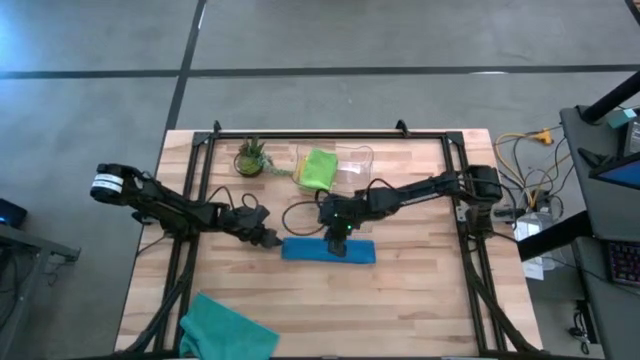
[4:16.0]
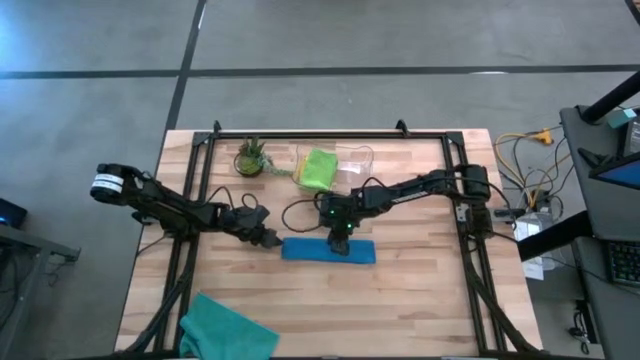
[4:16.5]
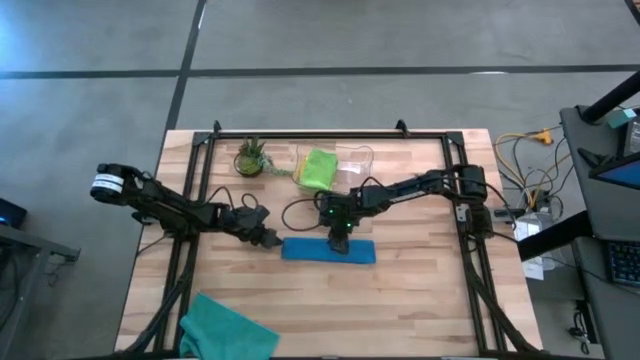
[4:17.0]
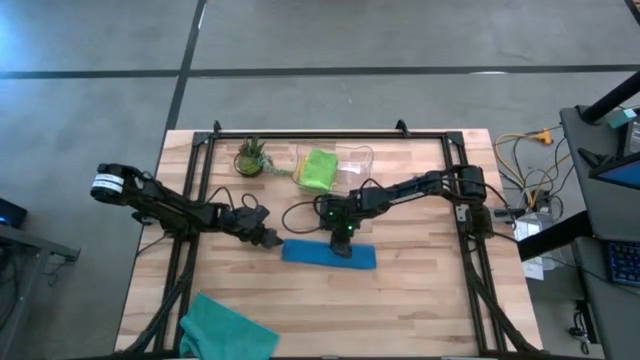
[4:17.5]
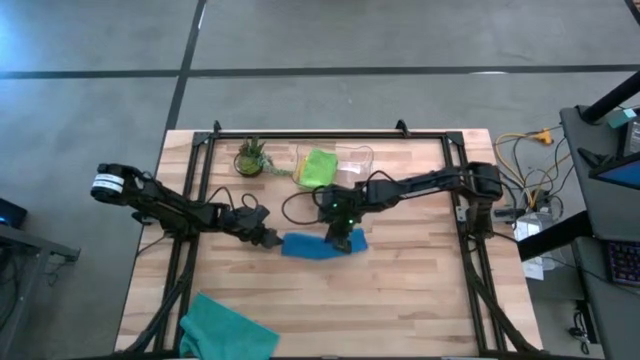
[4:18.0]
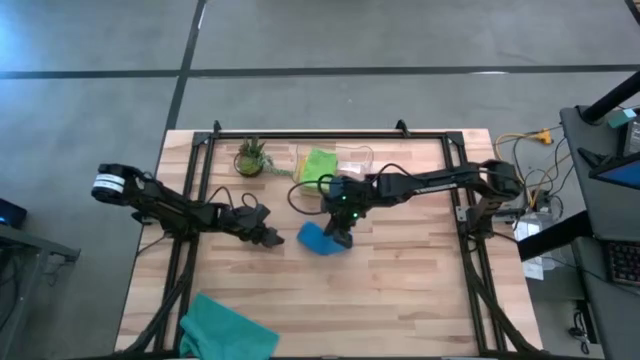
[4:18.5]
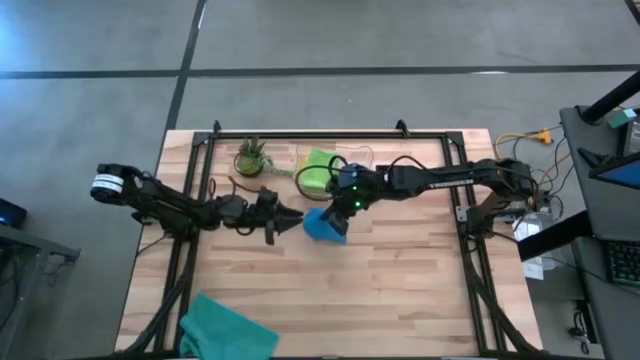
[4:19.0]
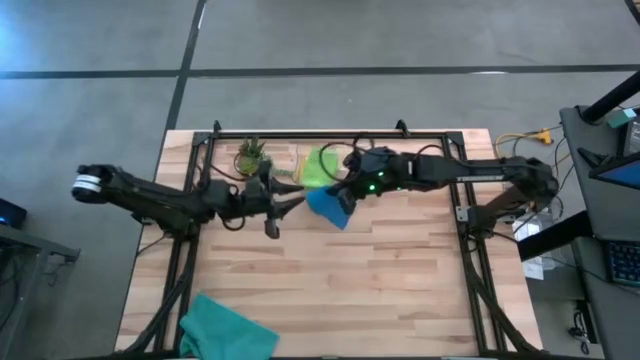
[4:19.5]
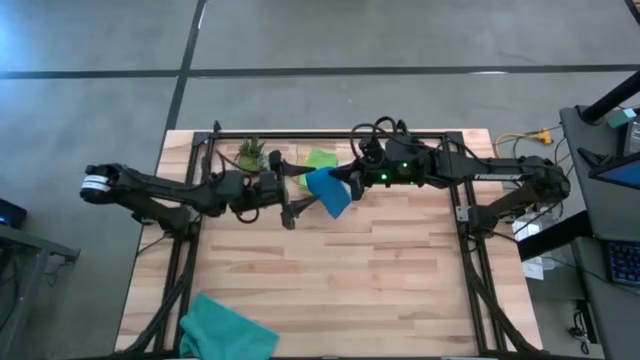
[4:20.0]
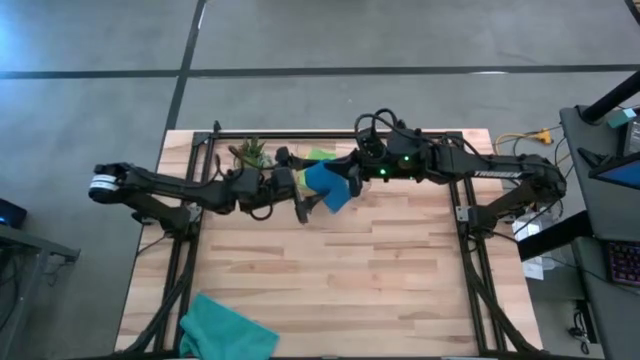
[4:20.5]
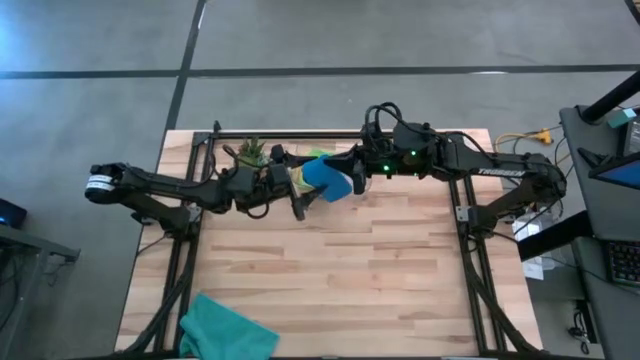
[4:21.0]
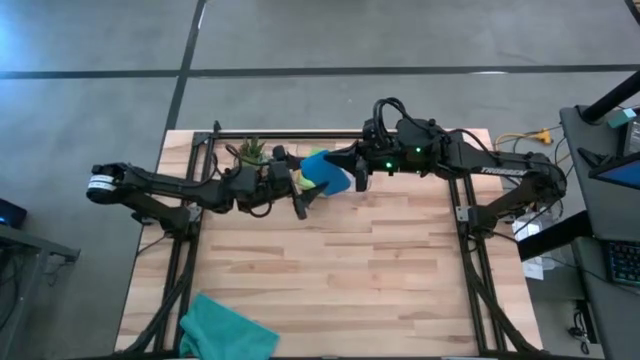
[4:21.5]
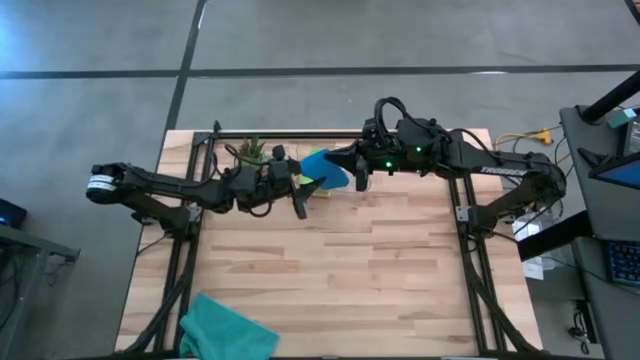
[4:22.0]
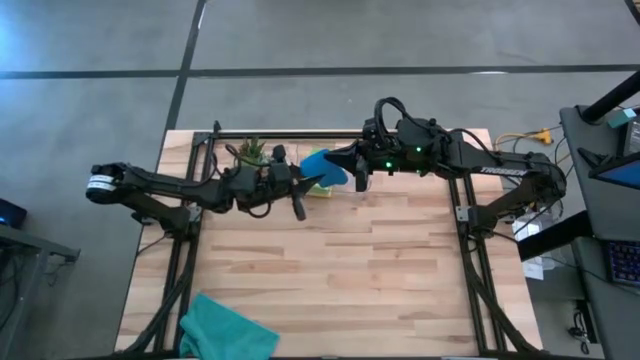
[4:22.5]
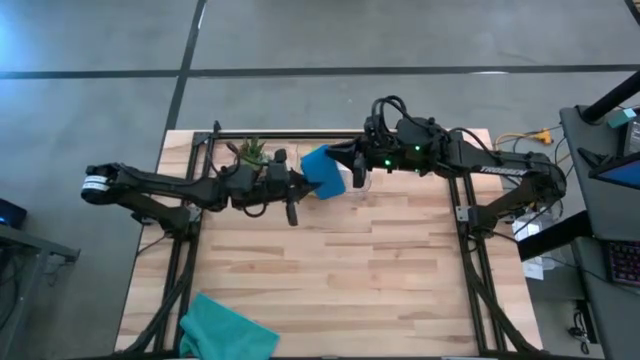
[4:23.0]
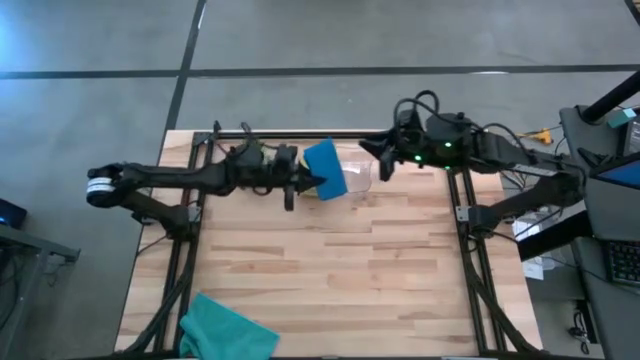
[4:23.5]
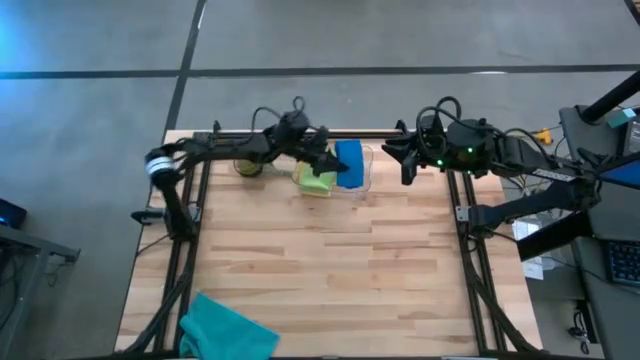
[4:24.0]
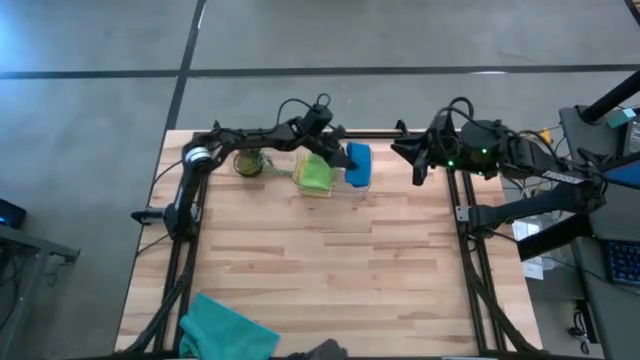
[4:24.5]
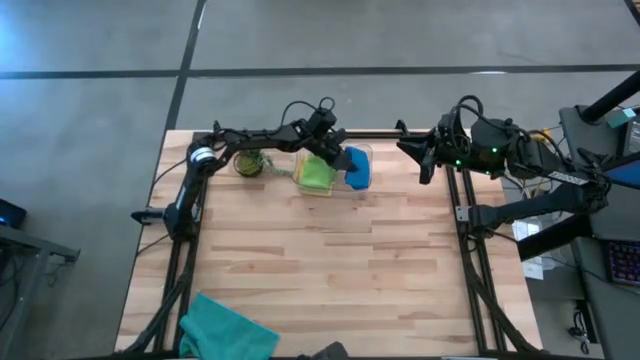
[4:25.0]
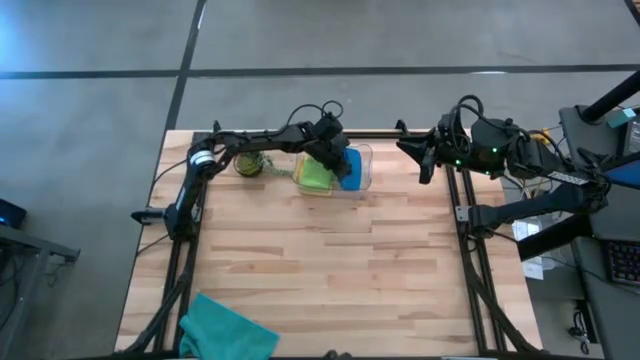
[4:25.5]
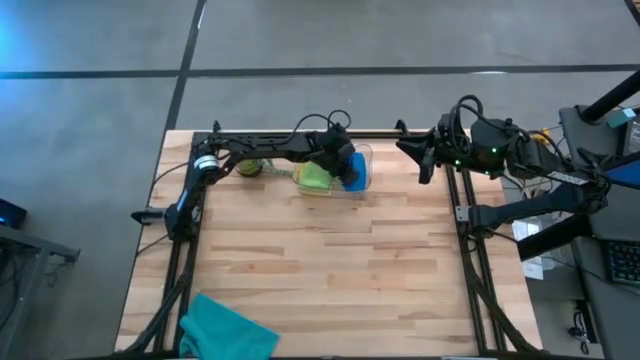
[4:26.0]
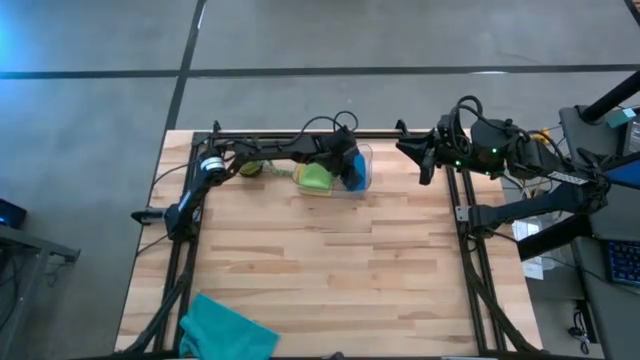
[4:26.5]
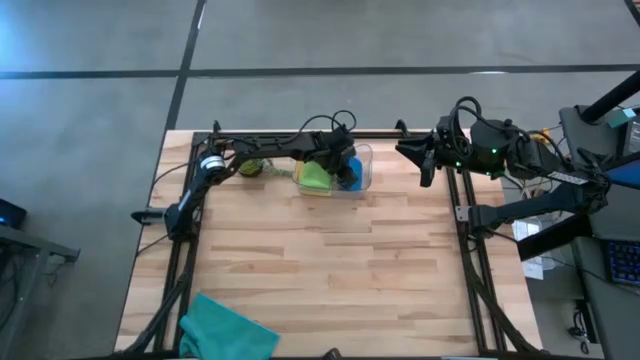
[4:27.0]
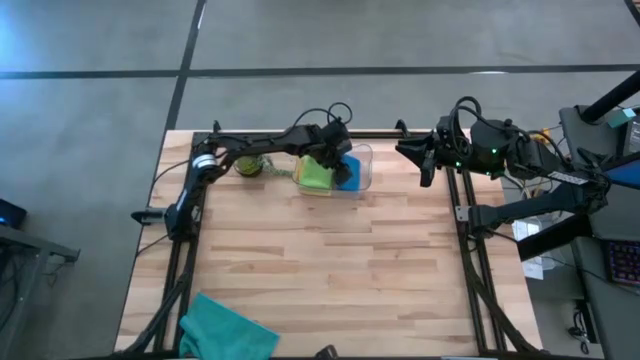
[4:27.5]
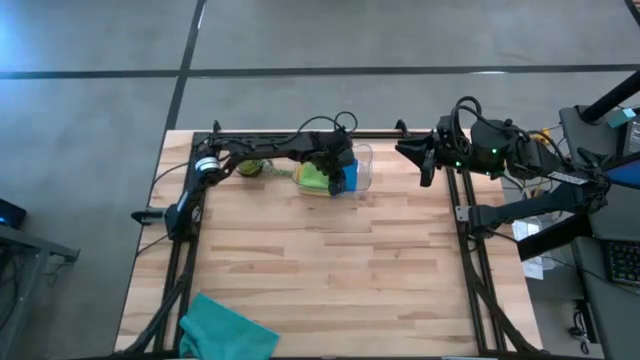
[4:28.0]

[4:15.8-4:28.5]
Task: Fold microfiber towels
Put the blue microfiber towel into the transparent bin

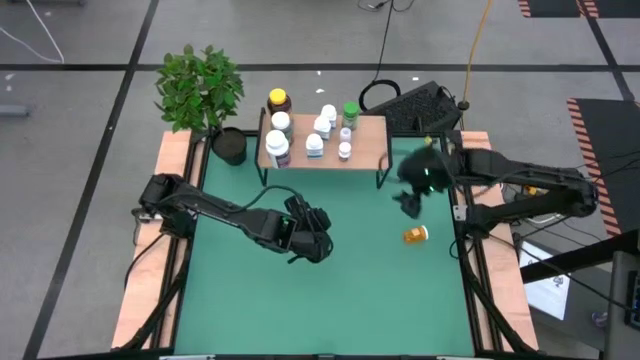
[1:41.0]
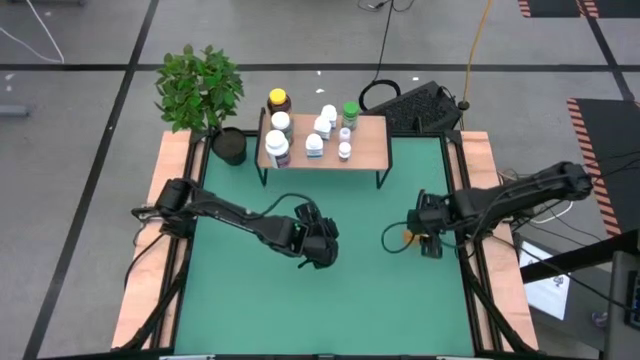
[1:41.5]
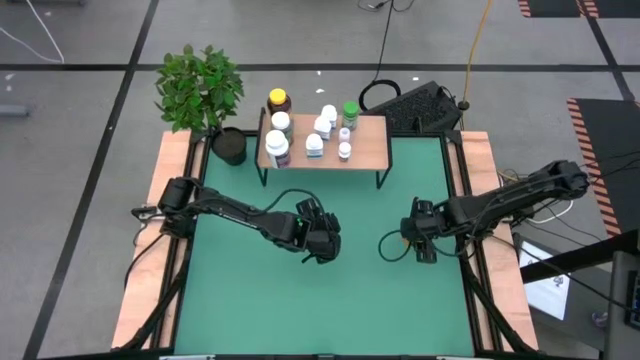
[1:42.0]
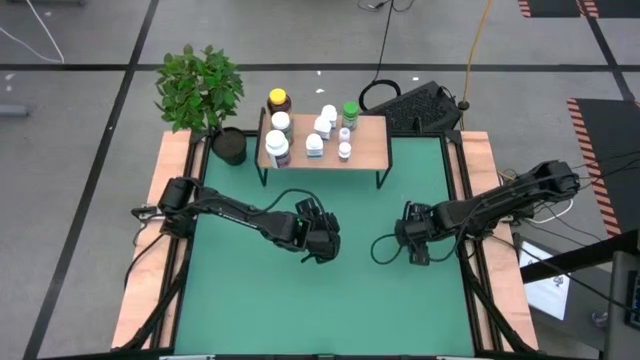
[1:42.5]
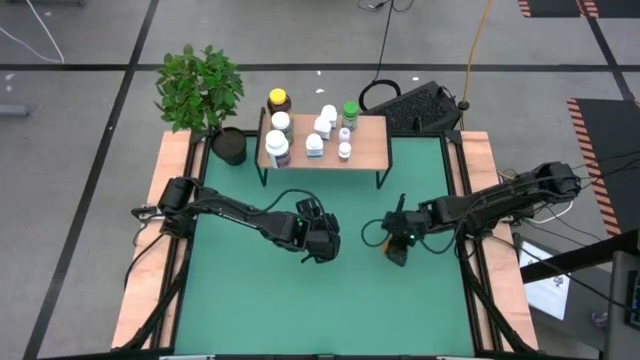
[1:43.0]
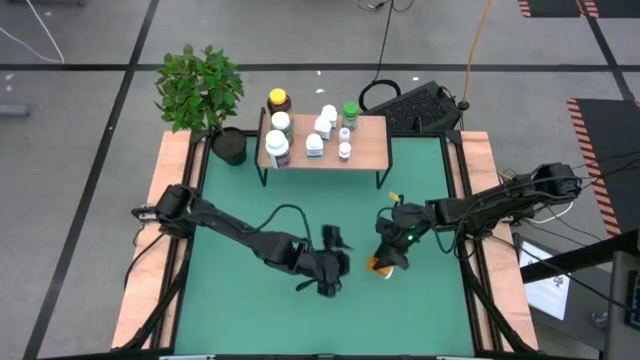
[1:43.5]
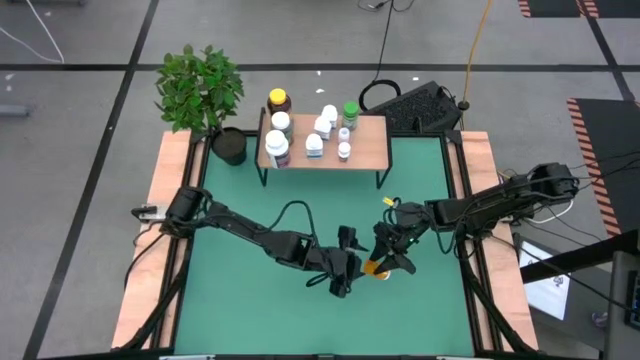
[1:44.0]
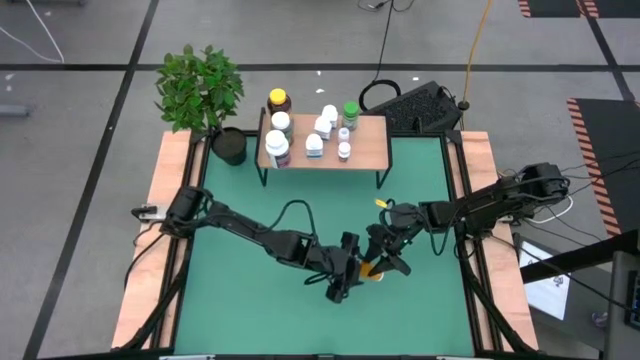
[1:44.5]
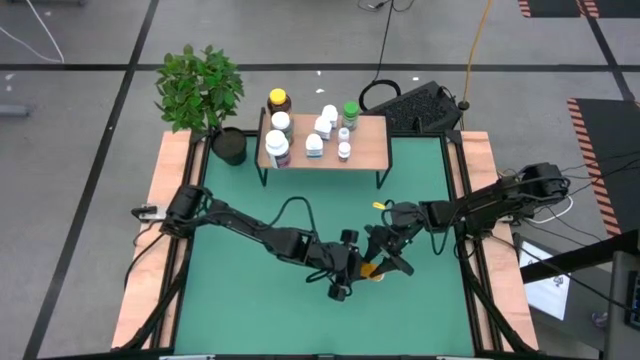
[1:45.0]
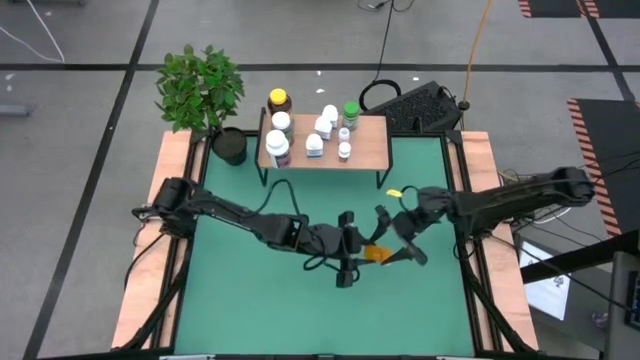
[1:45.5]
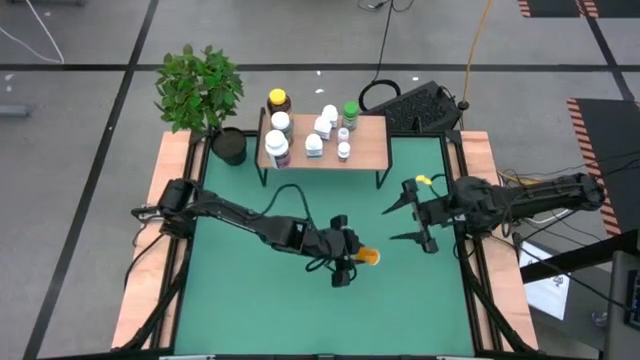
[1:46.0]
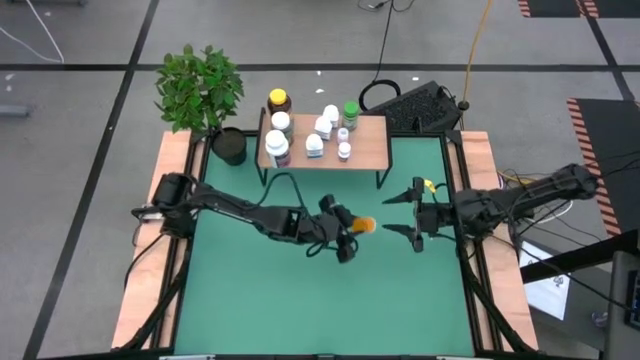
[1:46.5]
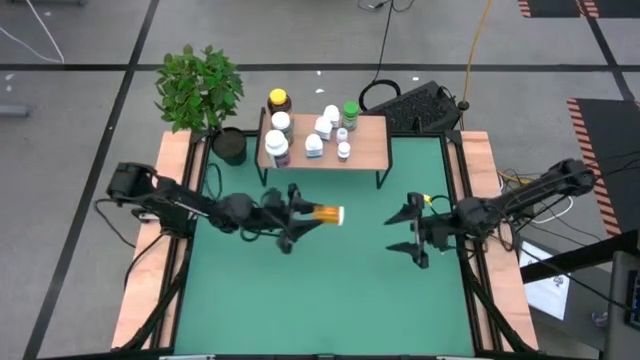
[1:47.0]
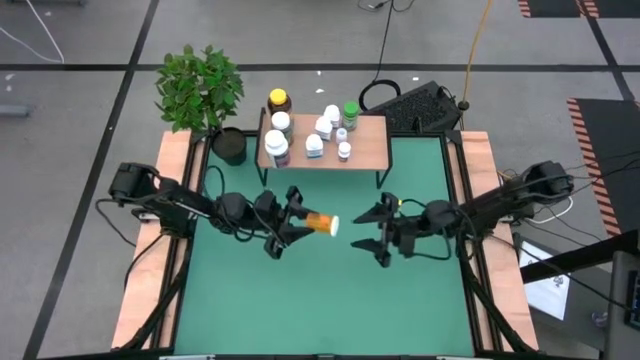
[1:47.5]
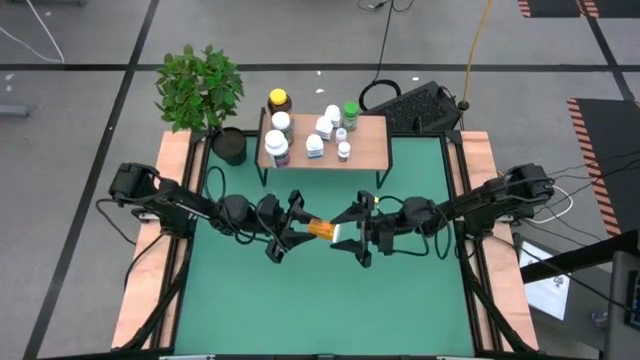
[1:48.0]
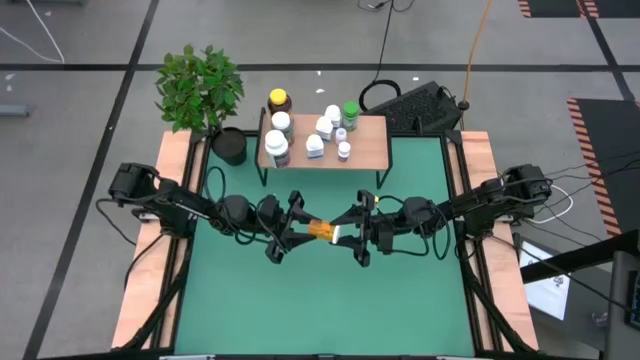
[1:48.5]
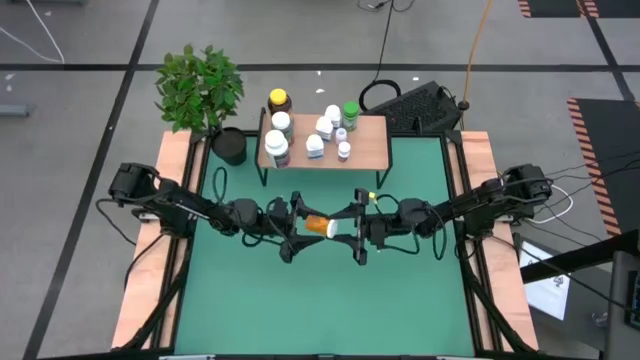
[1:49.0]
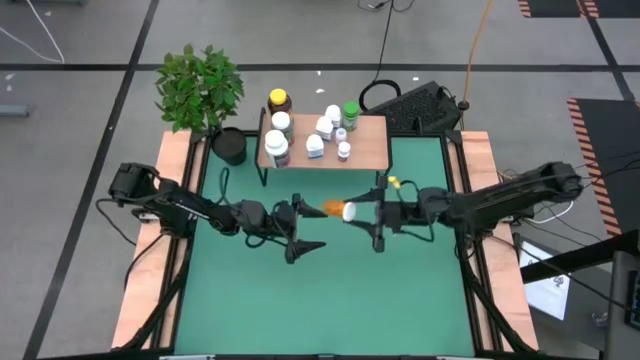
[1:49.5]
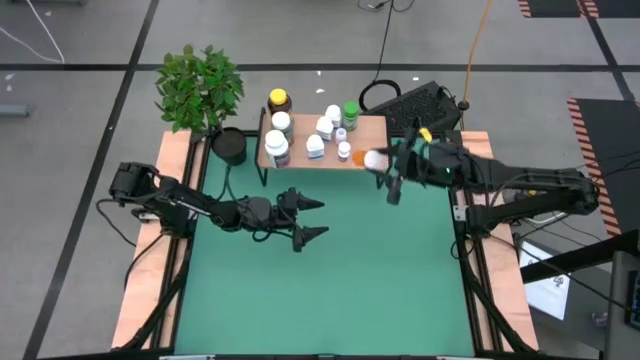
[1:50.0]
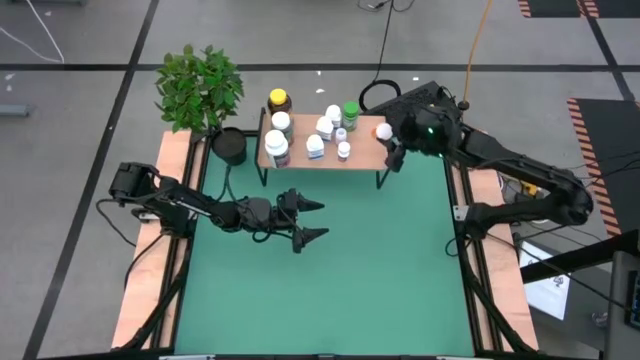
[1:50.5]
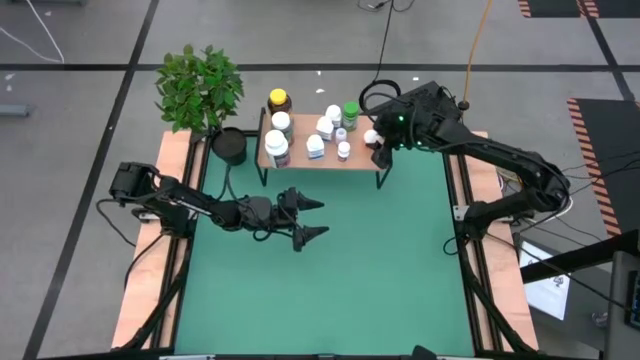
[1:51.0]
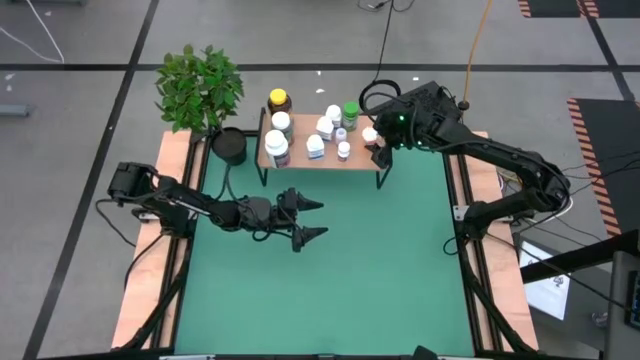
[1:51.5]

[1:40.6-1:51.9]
Task: Pick and place medicine bottles onto shelf by color
Put the orange capsule bottle on the shelf
